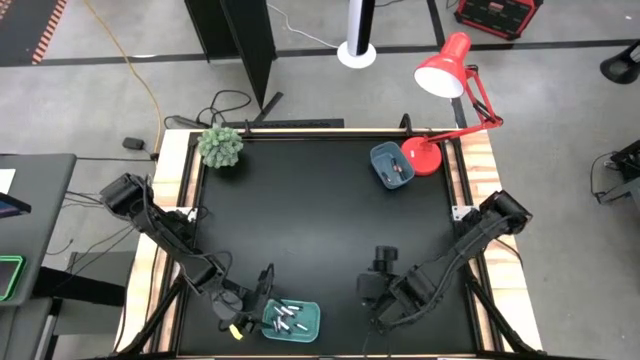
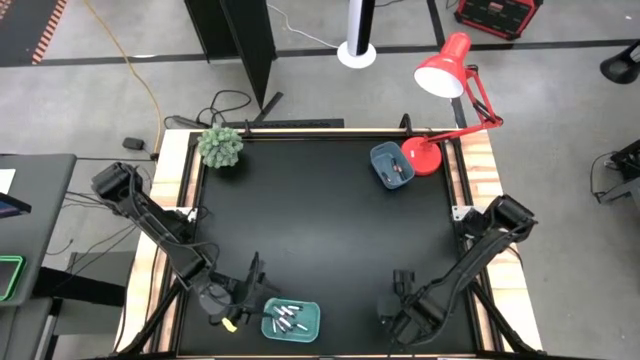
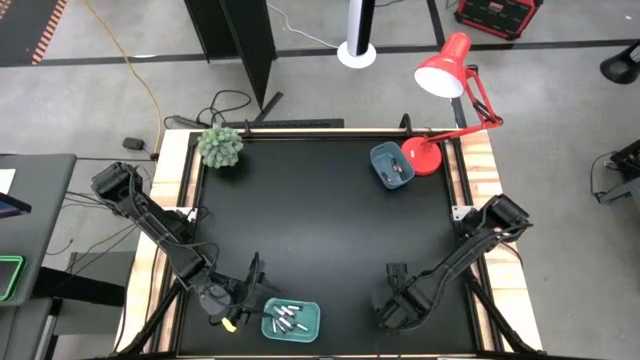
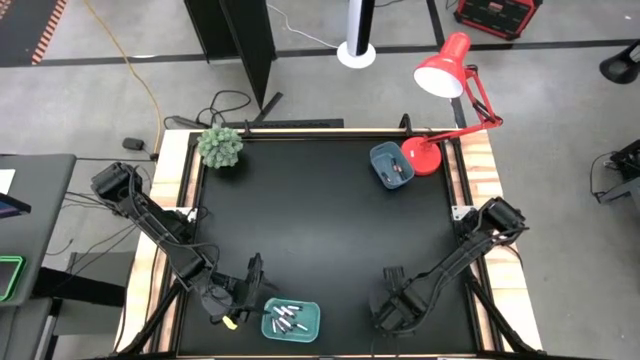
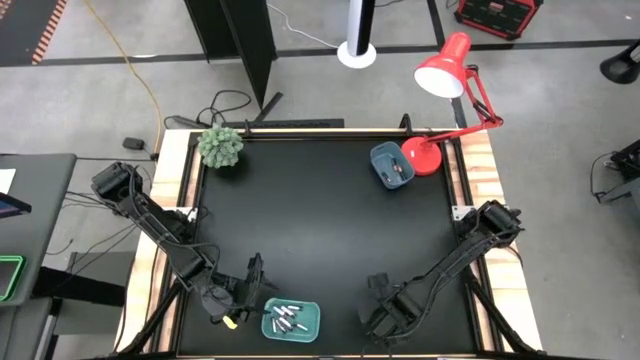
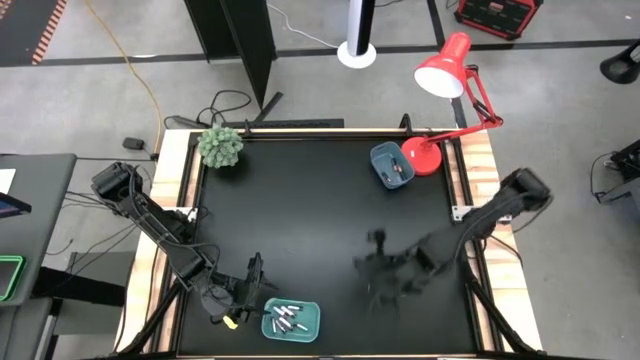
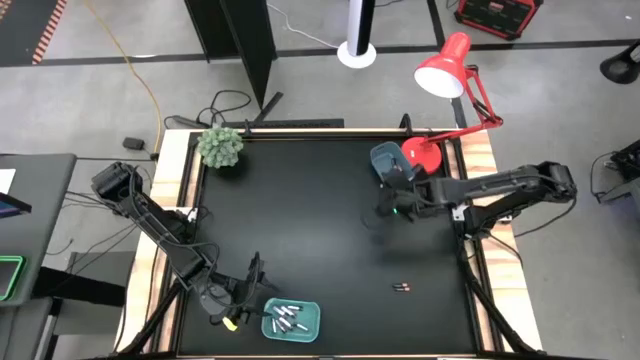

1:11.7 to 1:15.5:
Task: Sort batteries
Put the black battery into the blue bin

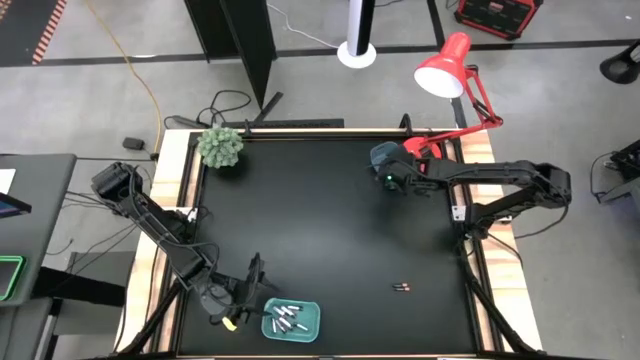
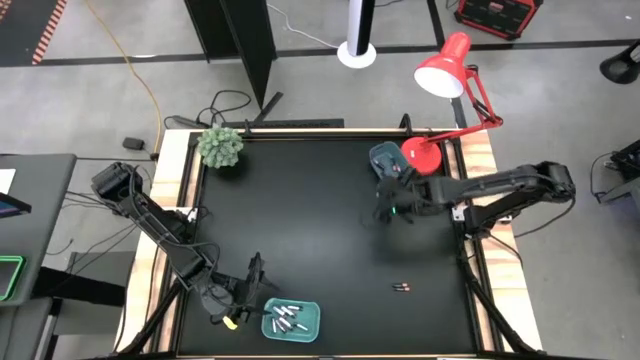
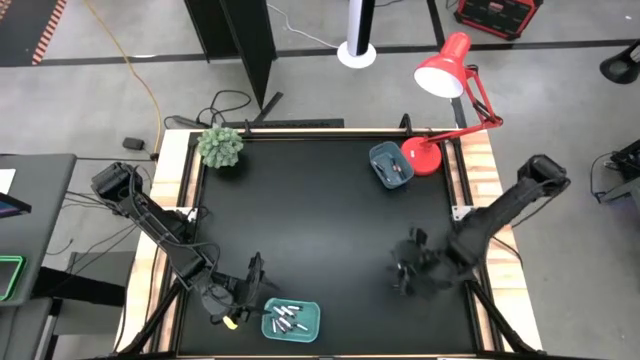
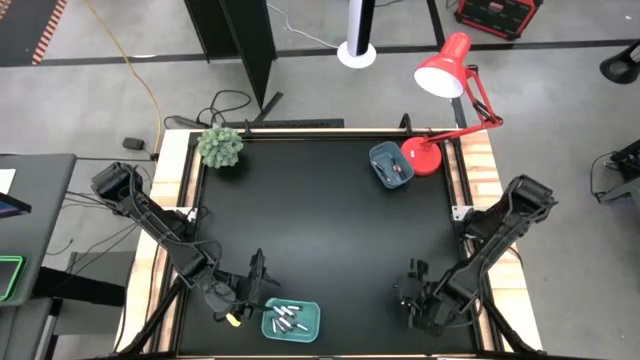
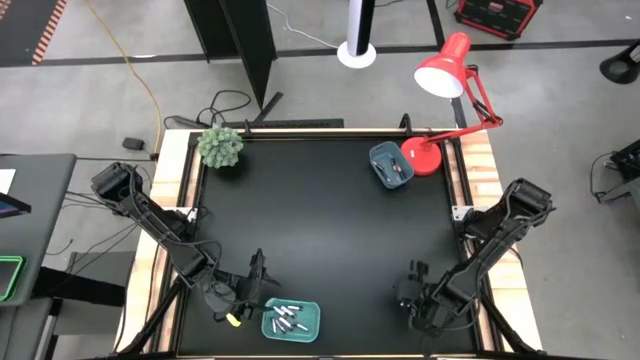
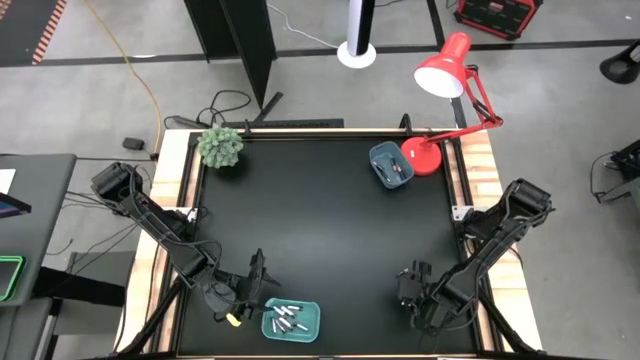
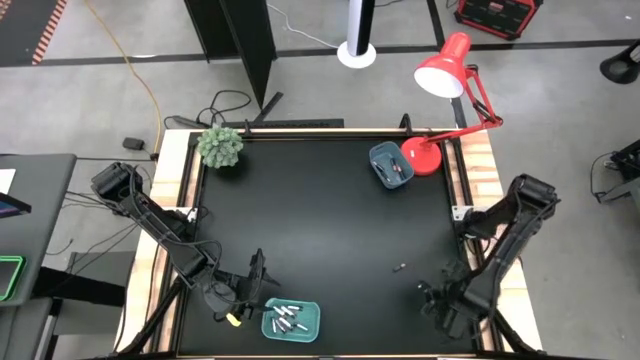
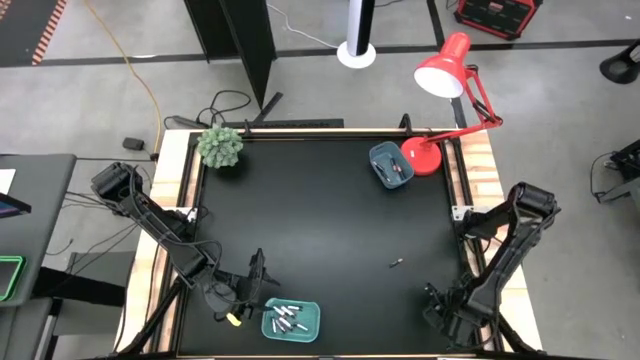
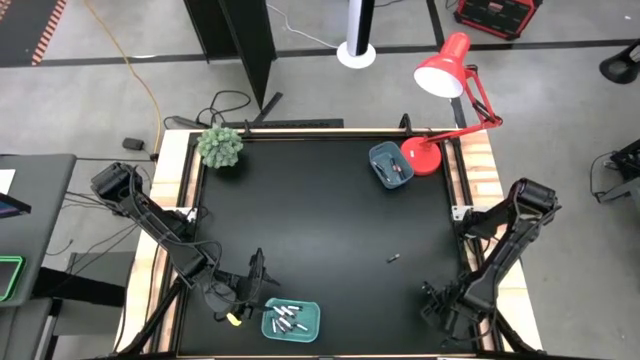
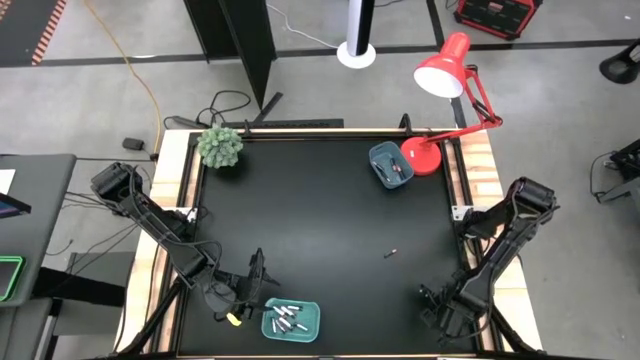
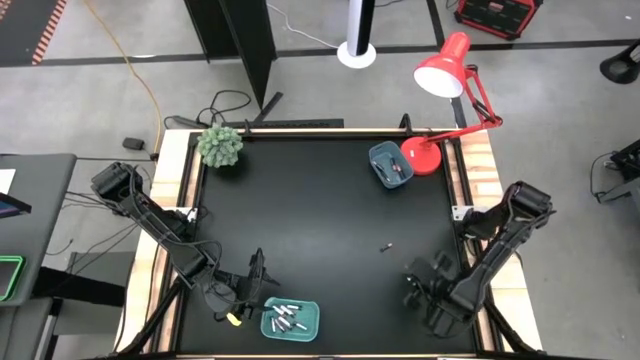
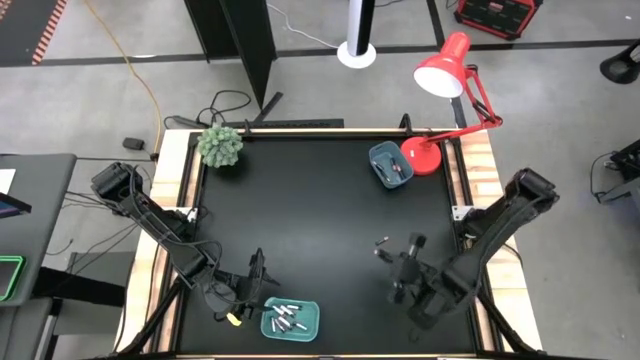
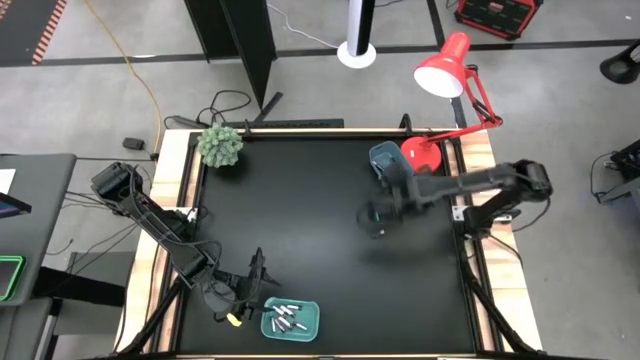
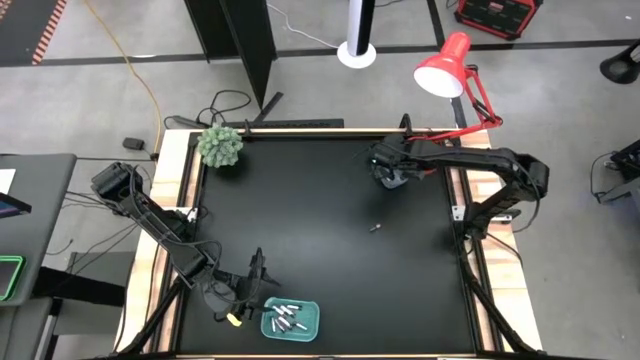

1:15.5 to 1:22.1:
Put the black battery into the blue bin

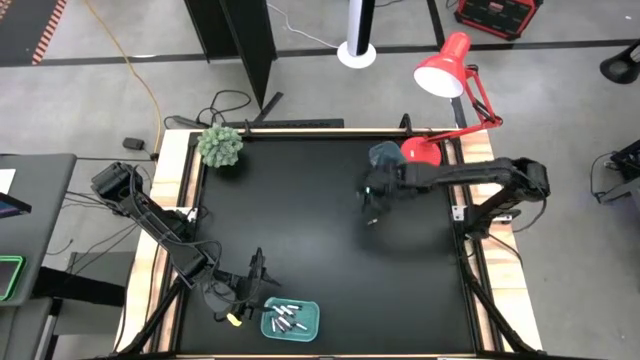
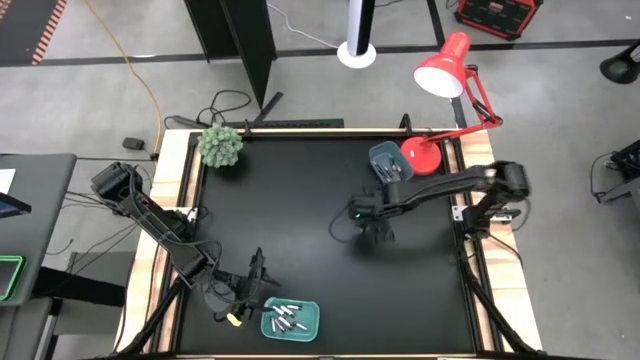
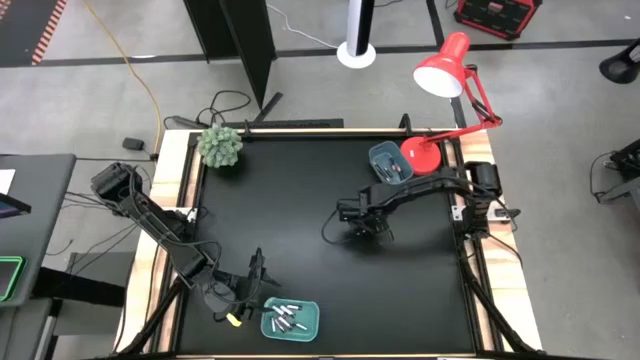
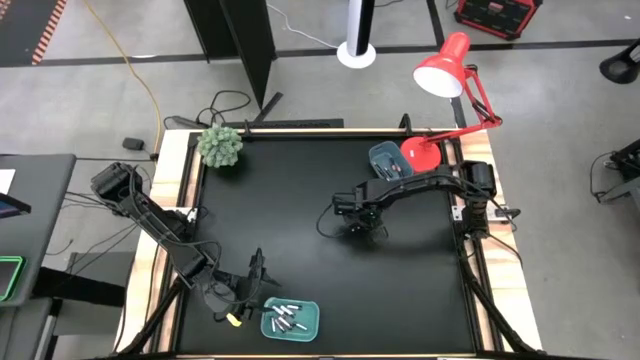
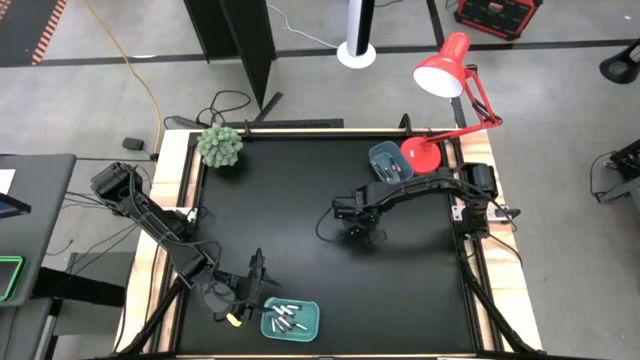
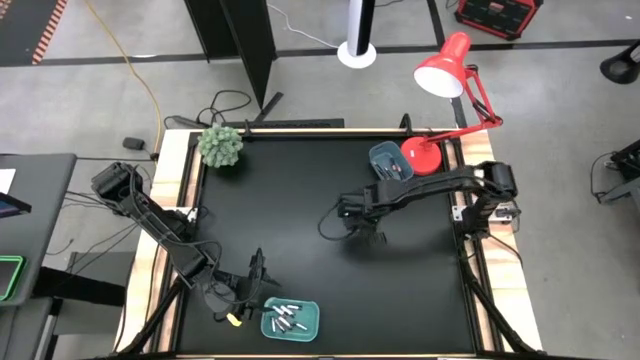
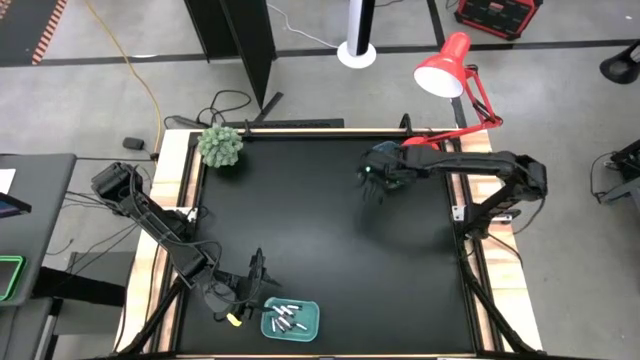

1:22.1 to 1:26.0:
Put the black battery into the blue bin

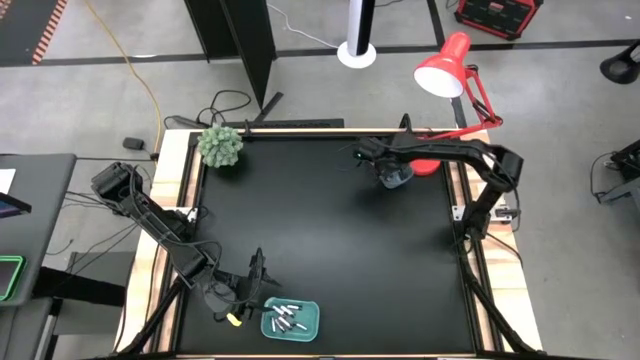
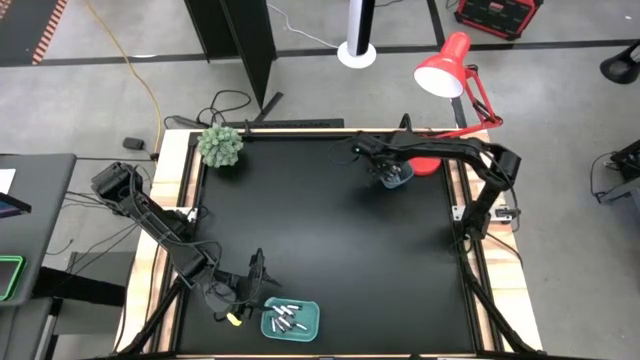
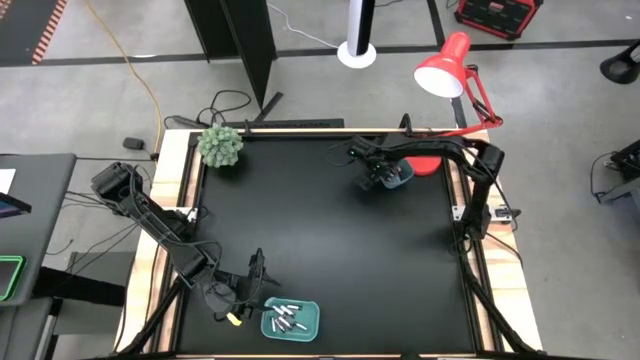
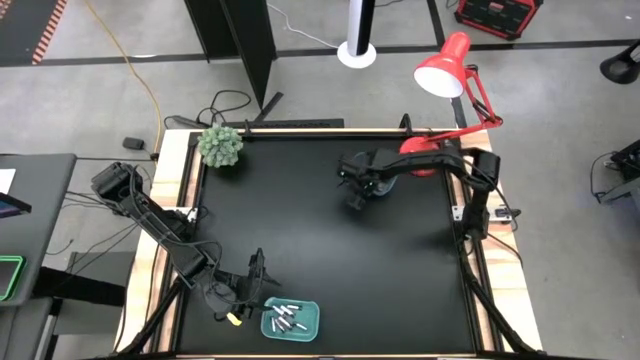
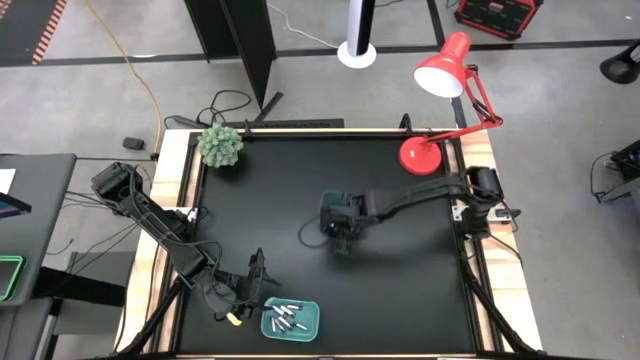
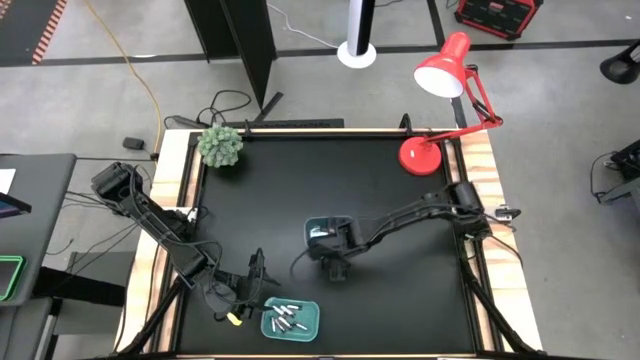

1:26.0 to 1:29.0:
Move the blue bin to the center of the table

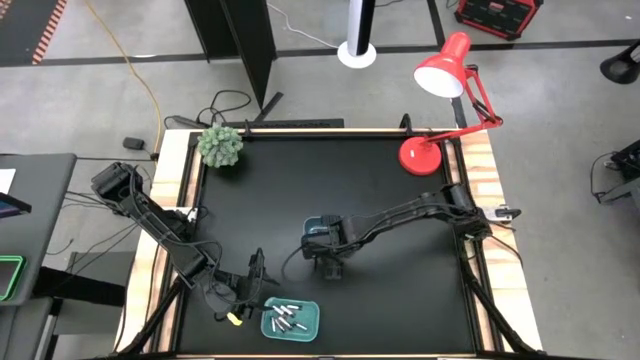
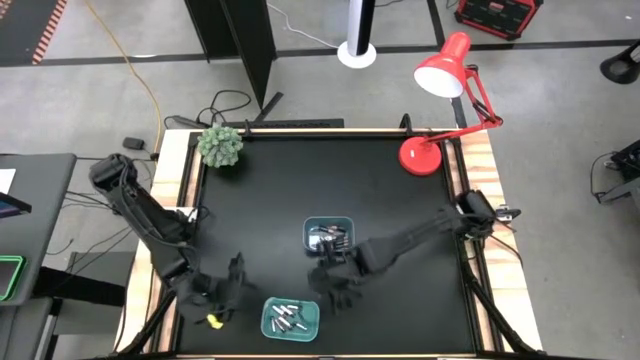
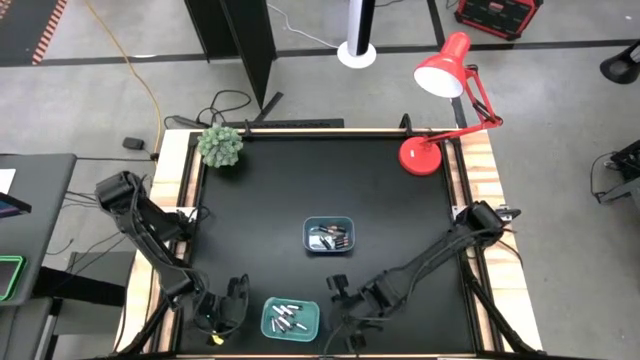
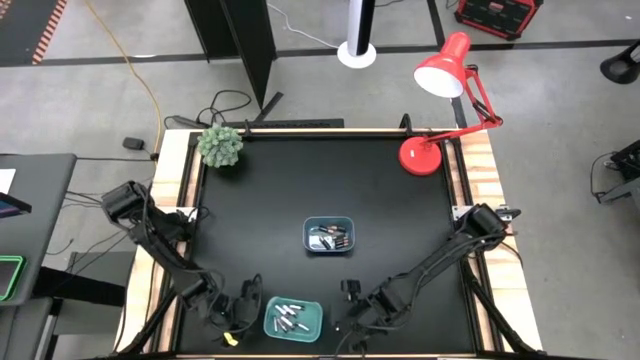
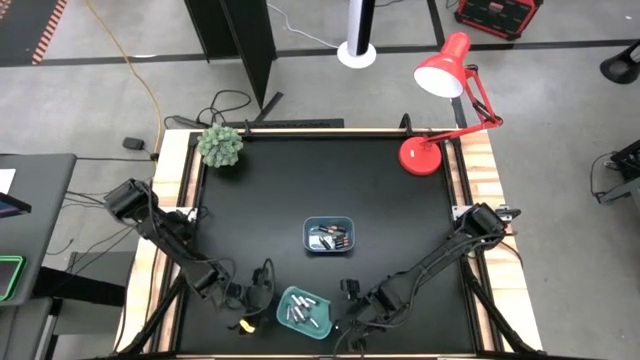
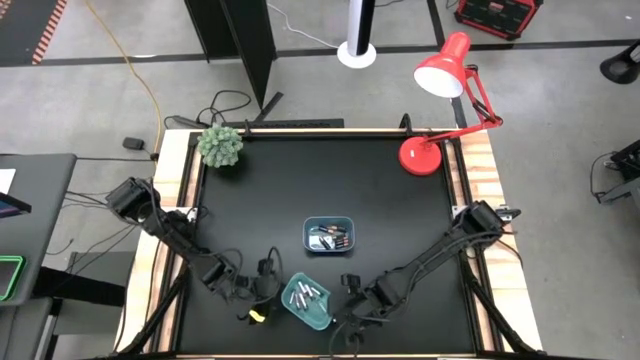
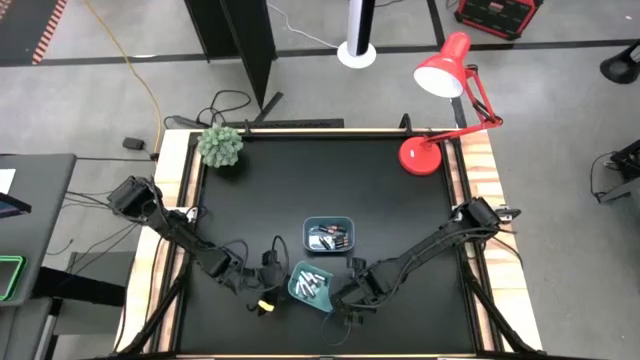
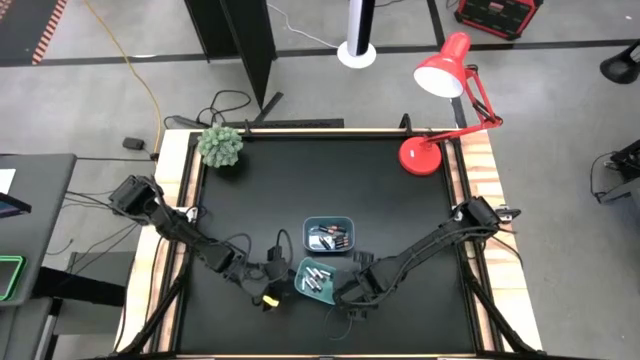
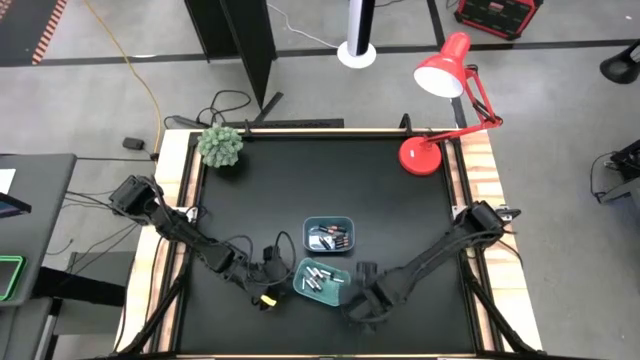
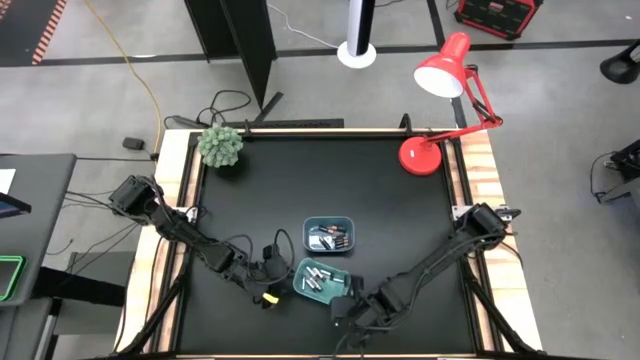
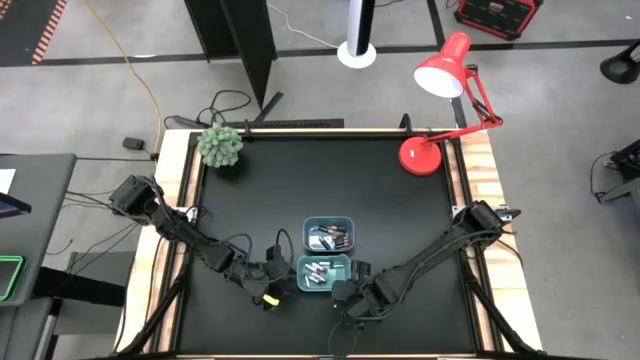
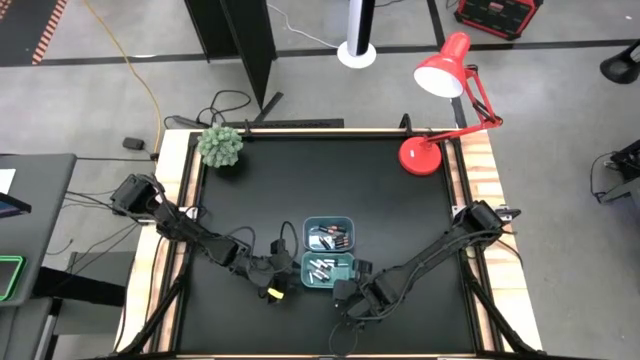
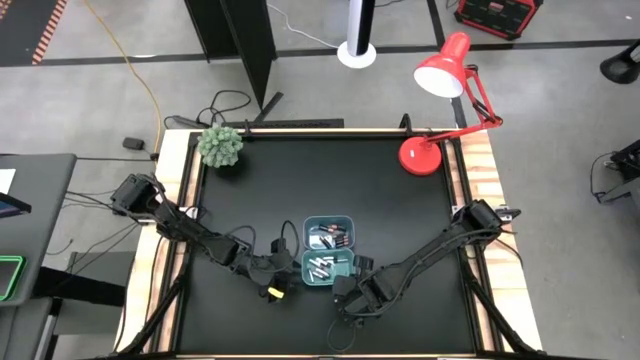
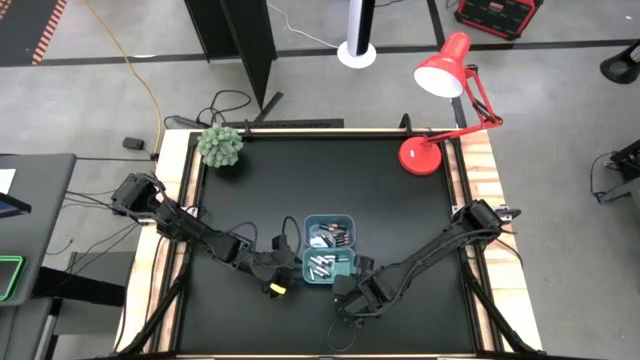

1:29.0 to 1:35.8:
Move the green bin on the bottom of the blue bin
